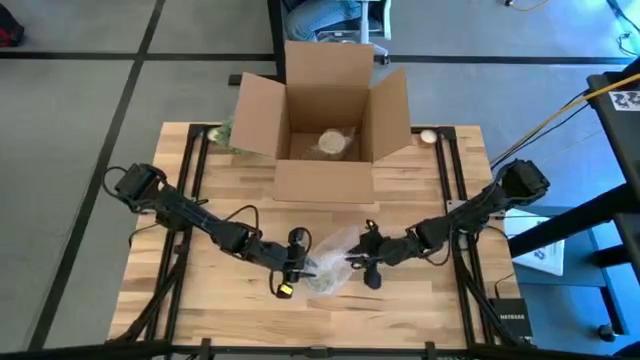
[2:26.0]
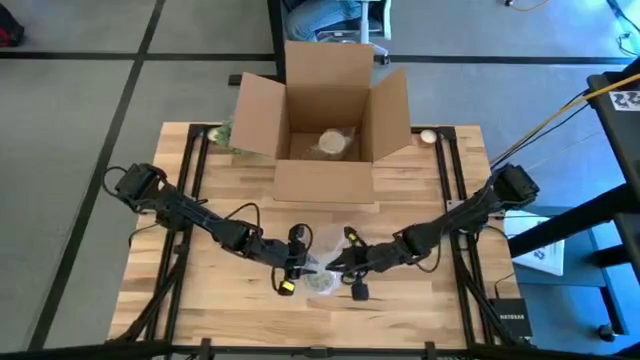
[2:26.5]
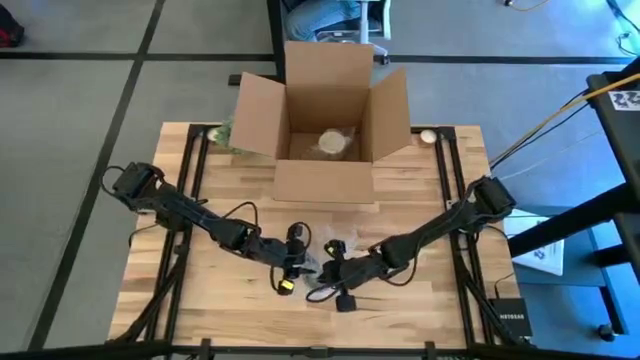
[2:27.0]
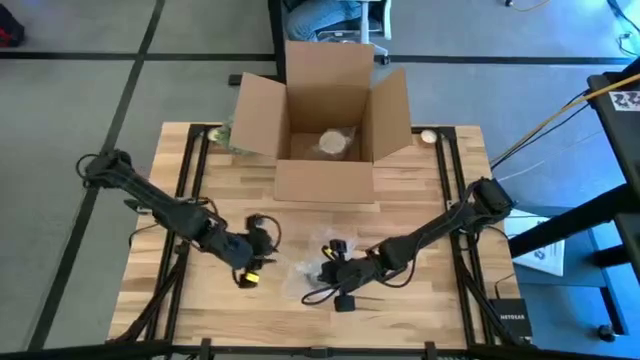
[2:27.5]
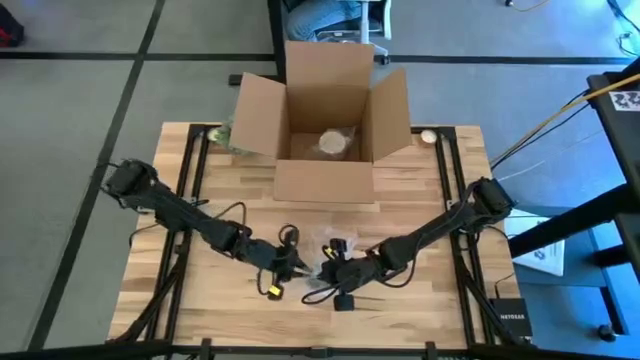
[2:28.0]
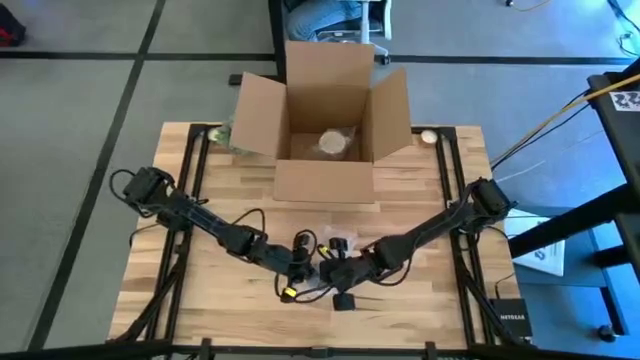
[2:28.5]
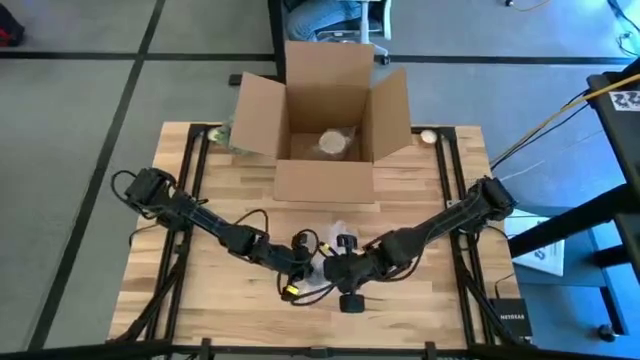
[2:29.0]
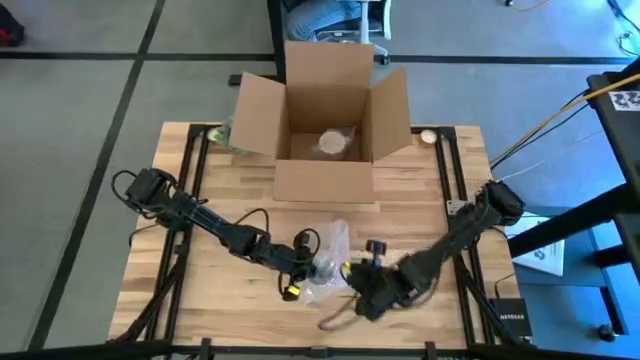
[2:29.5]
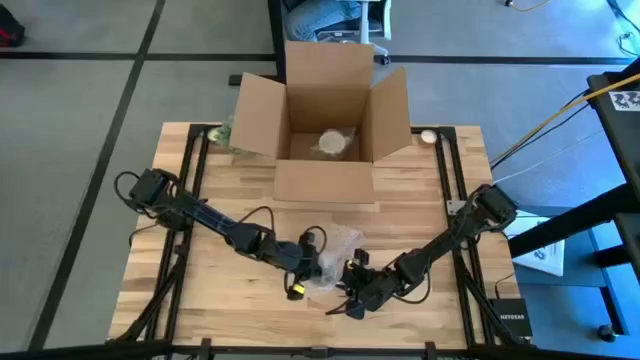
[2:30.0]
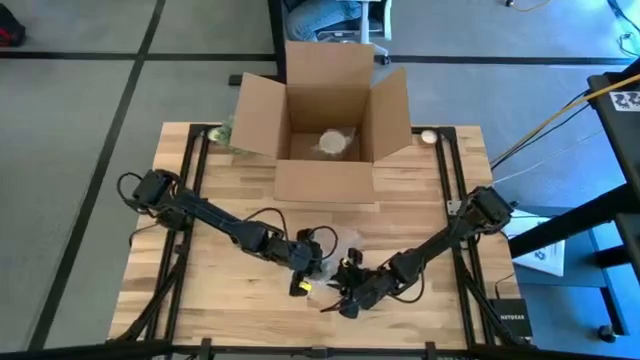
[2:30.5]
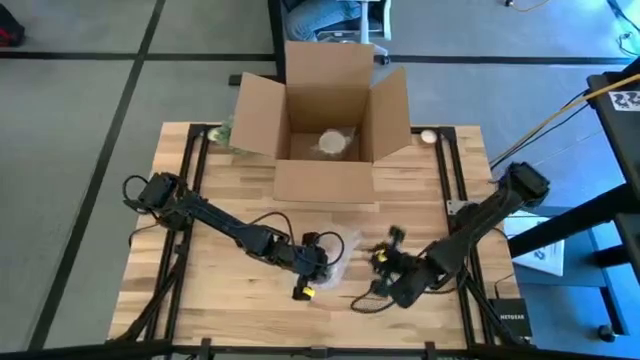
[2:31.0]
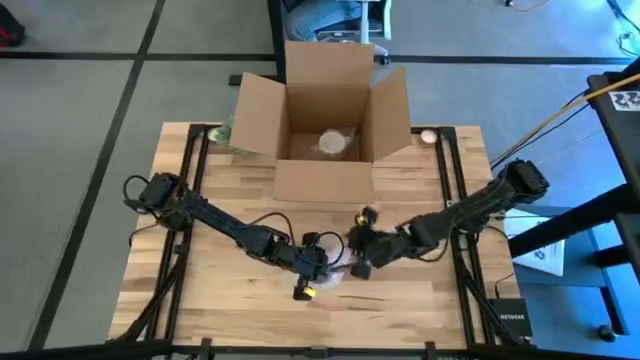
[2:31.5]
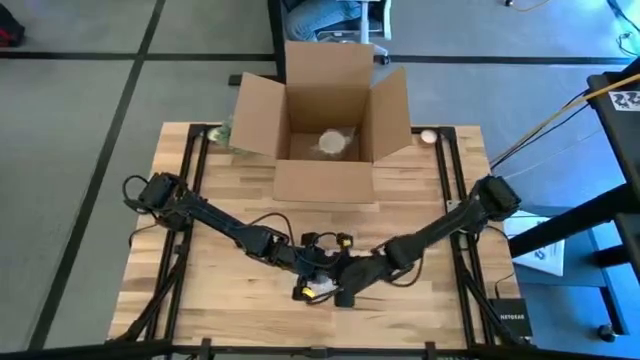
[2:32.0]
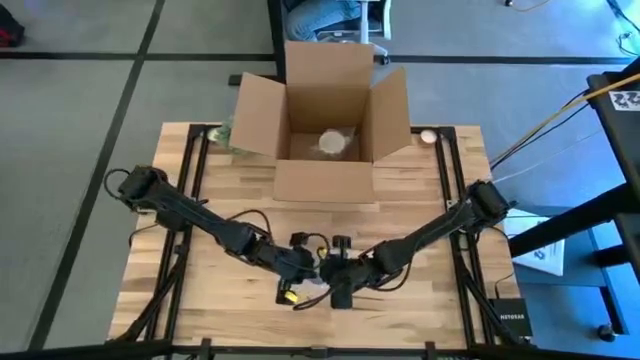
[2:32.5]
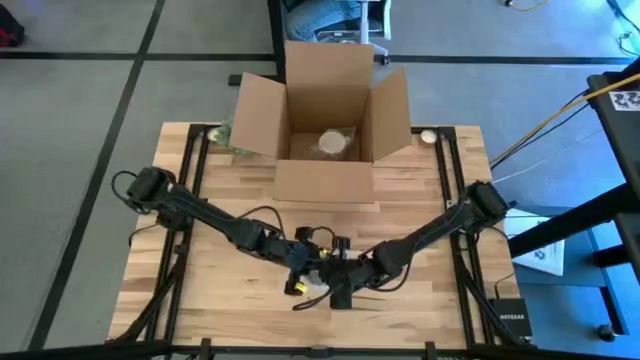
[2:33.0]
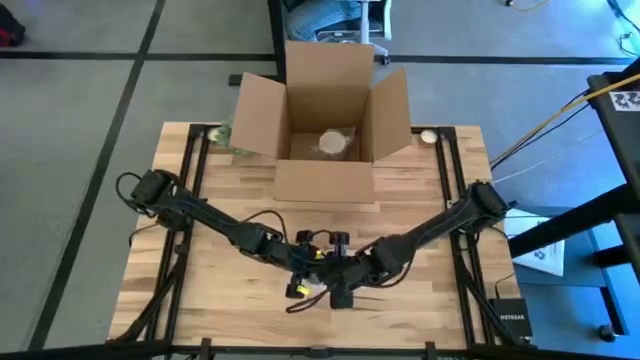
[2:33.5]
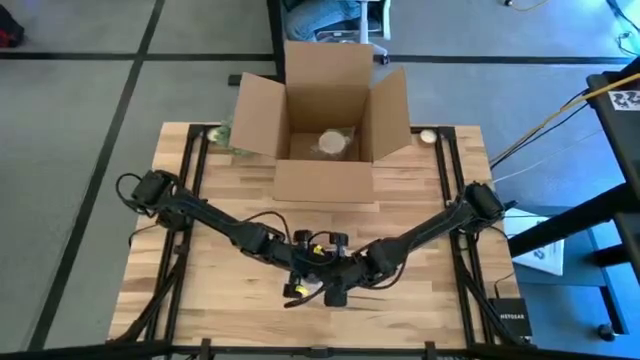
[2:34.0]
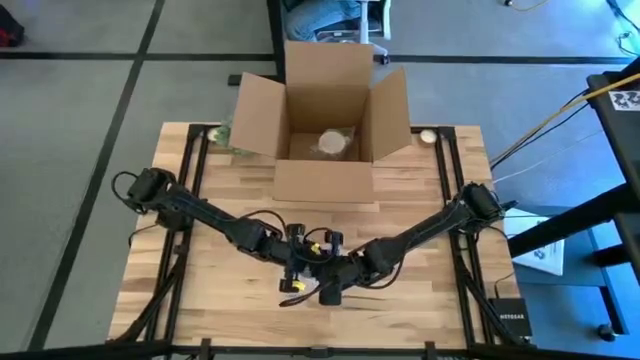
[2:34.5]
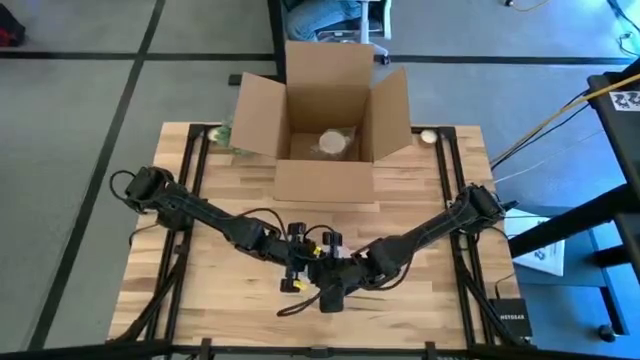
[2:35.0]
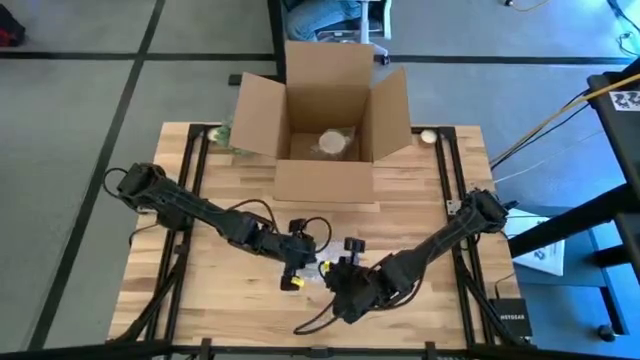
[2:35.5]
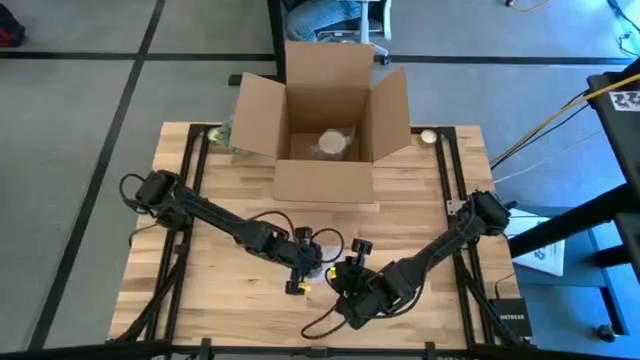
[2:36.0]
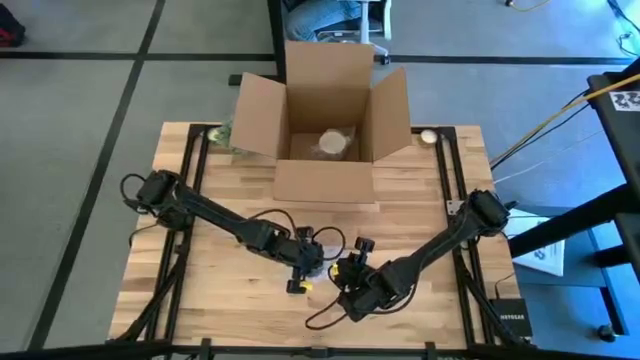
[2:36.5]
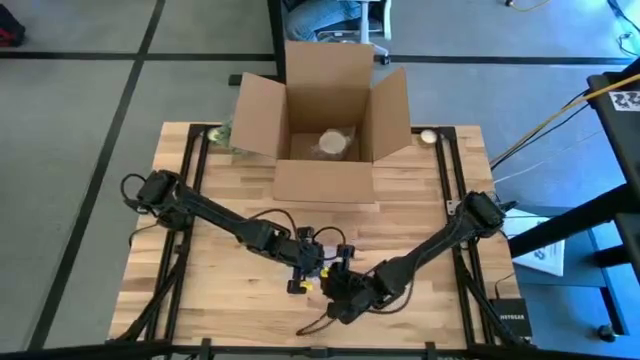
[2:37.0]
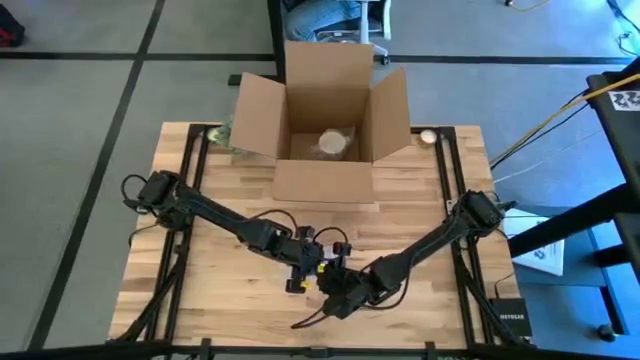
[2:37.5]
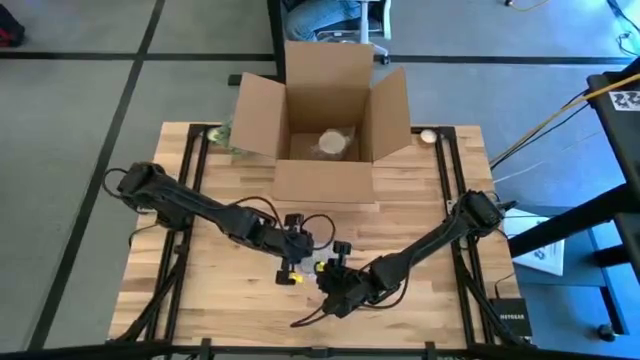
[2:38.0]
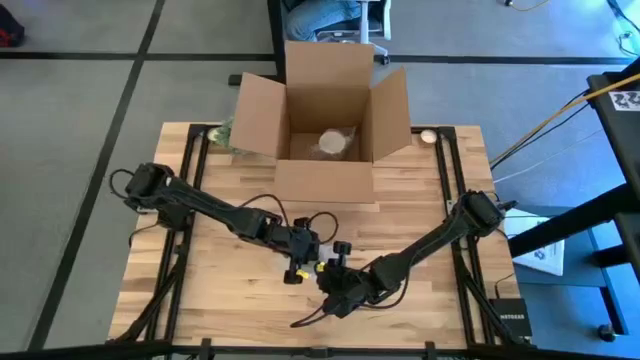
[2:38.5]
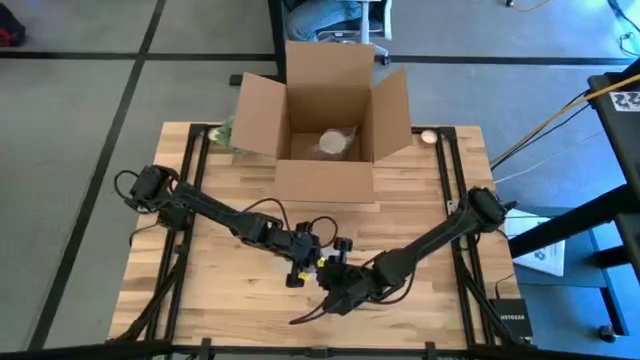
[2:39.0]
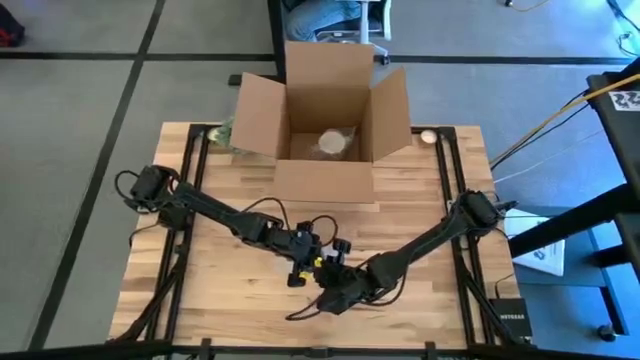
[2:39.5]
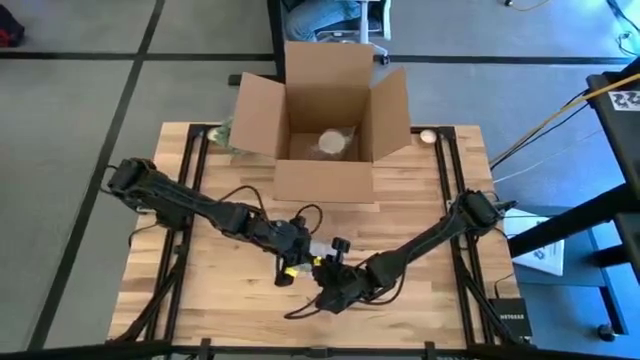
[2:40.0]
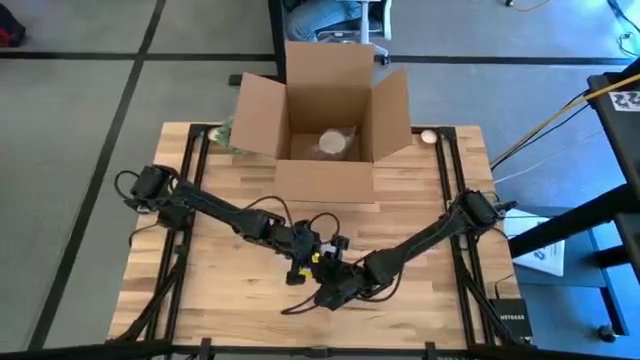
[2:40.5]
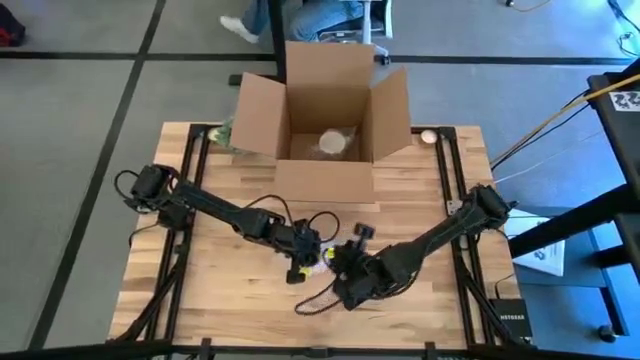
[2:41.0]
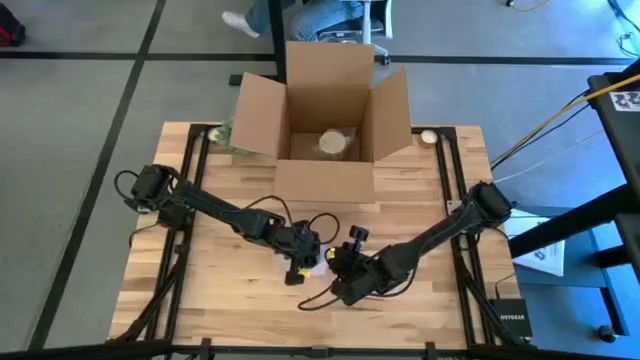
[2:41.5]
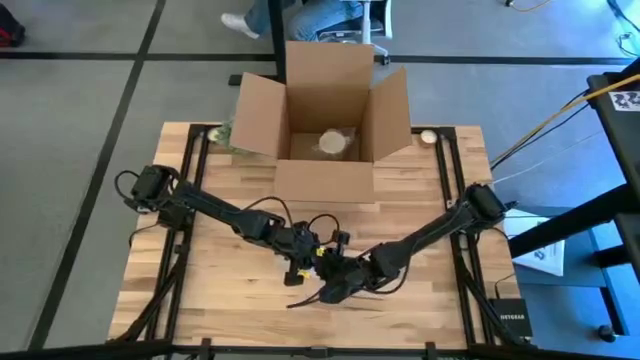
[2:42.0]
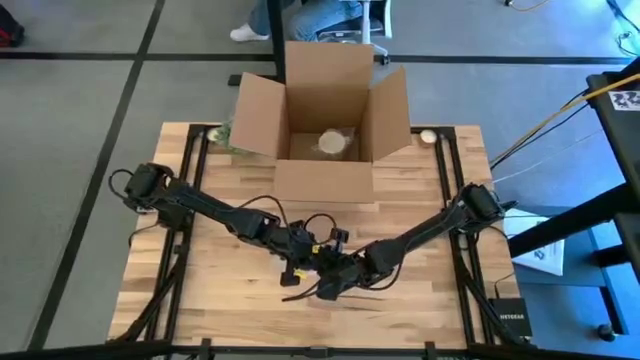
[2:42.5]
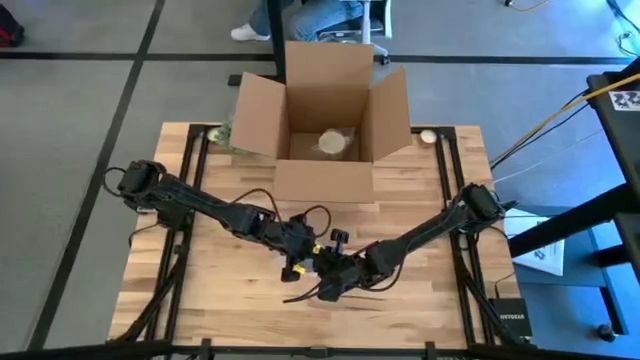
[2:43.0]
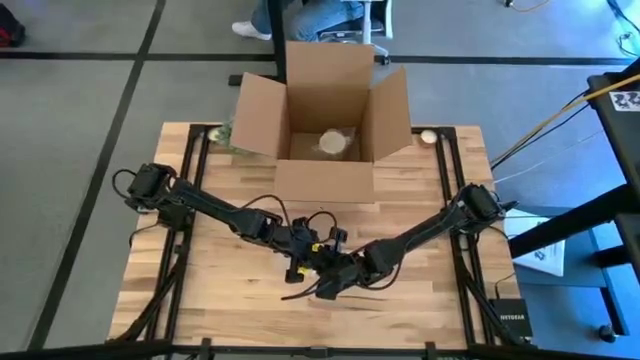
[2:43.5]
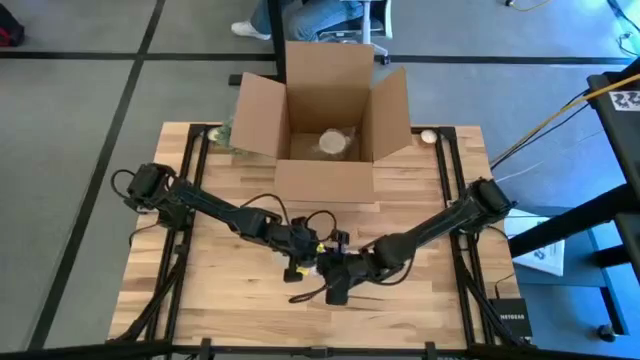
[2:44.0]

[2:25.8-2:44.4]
Task: wrap mug
Wrap the red mug with bubble wrap

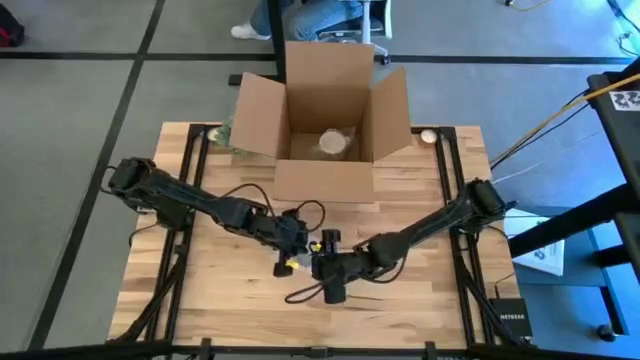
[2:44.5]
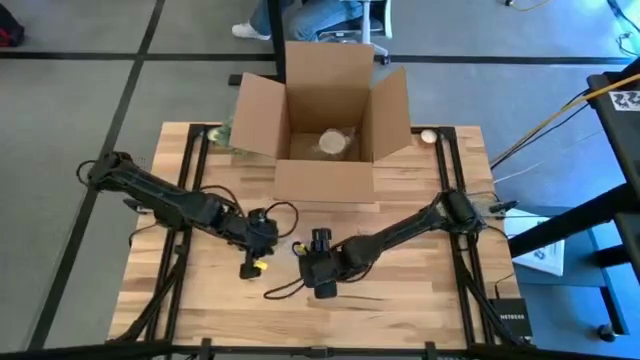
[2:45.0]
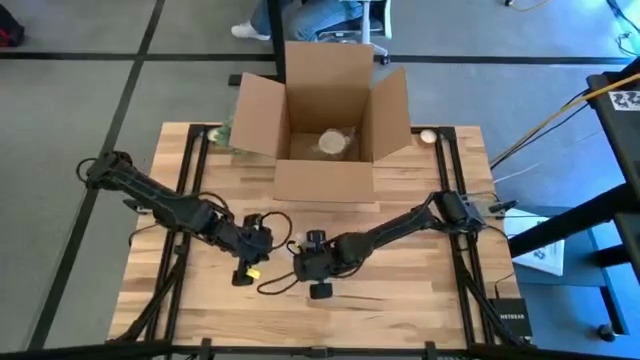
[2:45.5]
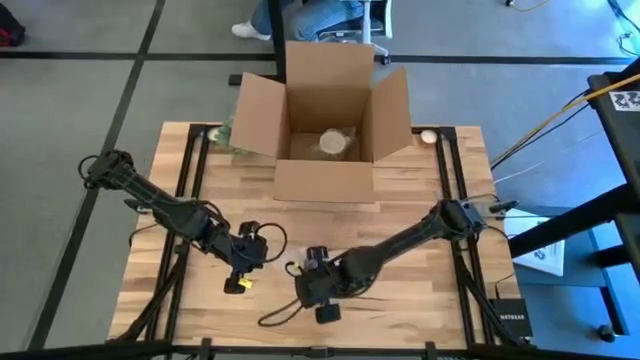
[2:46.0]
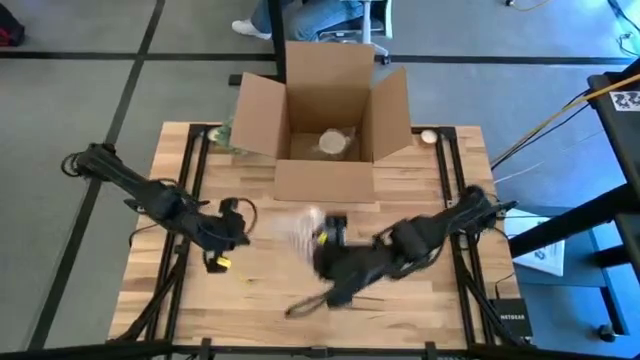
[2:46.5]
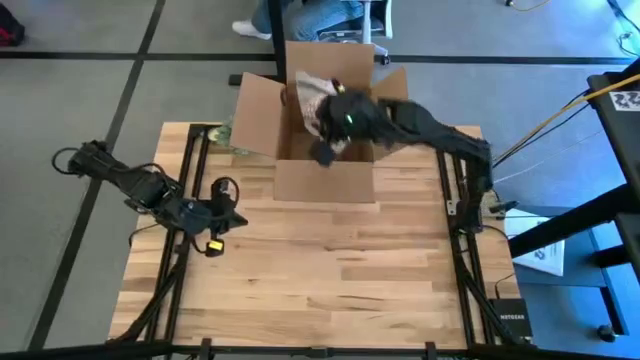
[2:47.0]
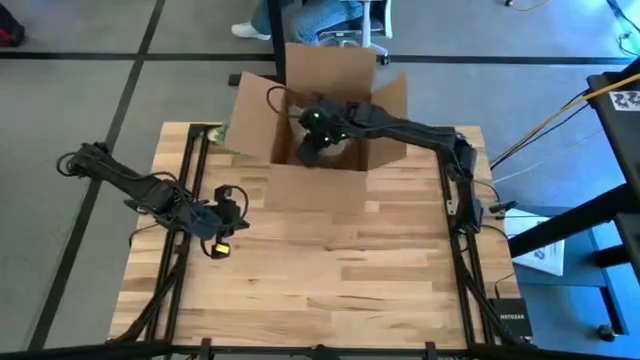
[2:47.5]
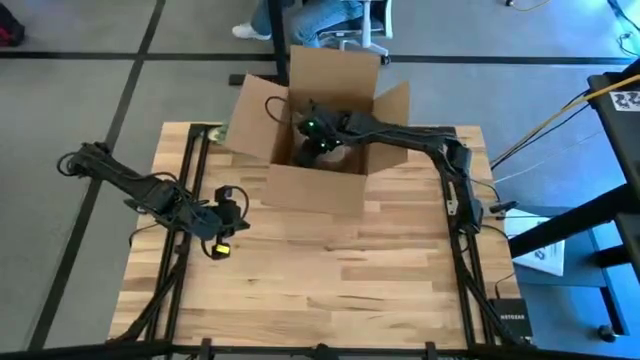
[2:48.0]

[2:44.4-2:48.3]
Put the wrapped red mug into the box
